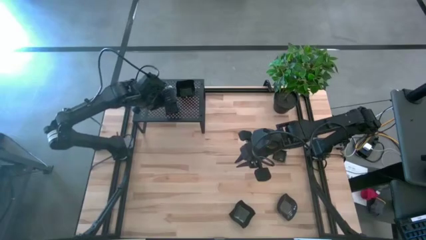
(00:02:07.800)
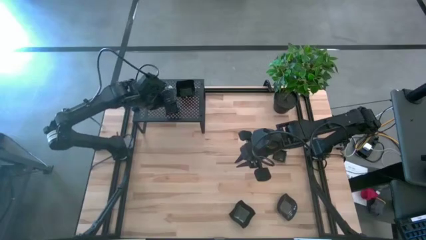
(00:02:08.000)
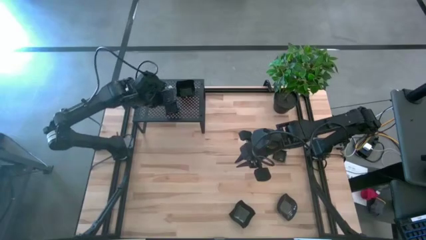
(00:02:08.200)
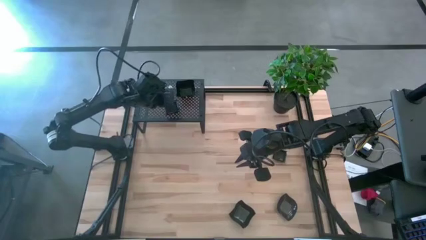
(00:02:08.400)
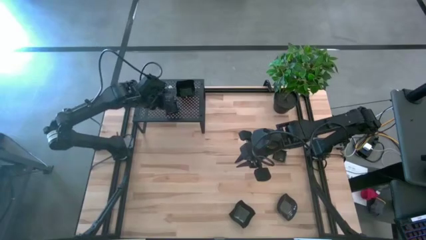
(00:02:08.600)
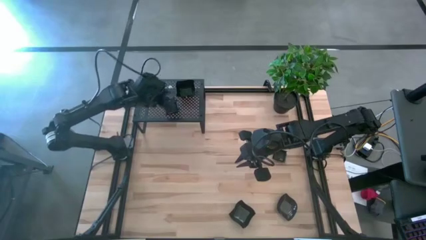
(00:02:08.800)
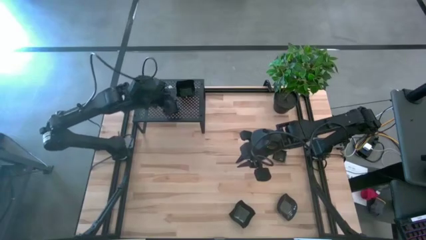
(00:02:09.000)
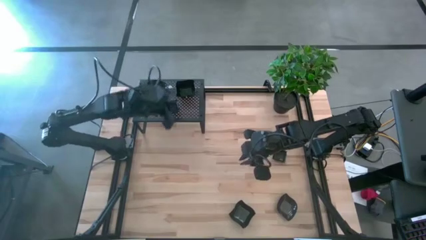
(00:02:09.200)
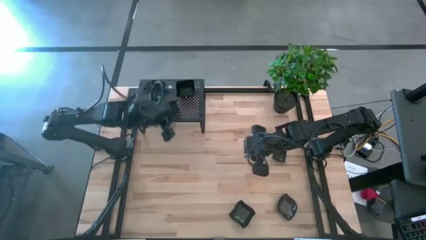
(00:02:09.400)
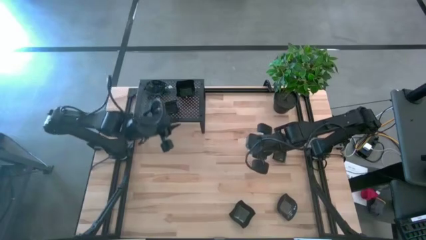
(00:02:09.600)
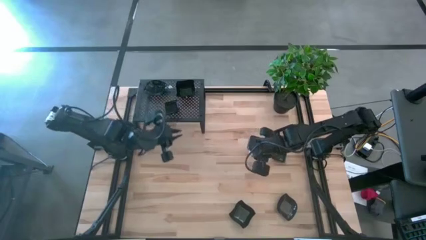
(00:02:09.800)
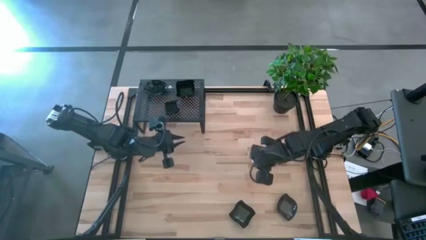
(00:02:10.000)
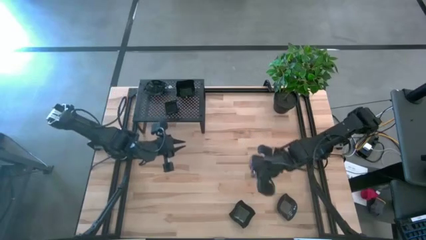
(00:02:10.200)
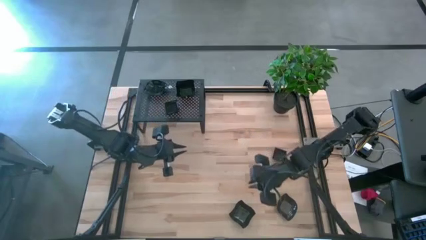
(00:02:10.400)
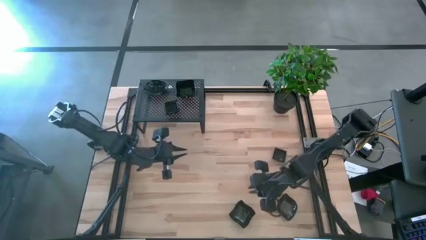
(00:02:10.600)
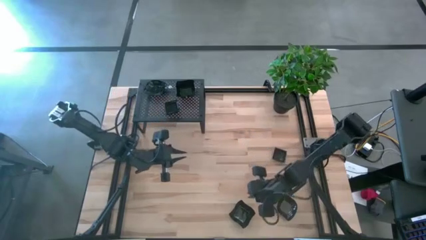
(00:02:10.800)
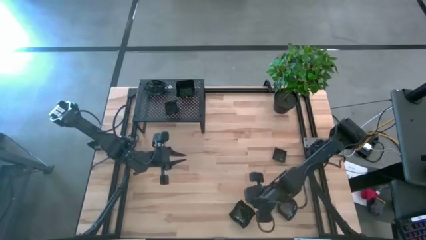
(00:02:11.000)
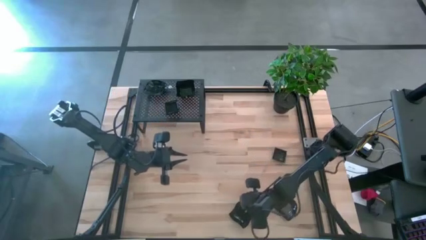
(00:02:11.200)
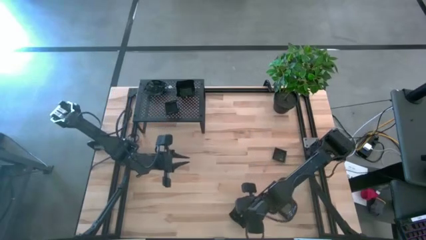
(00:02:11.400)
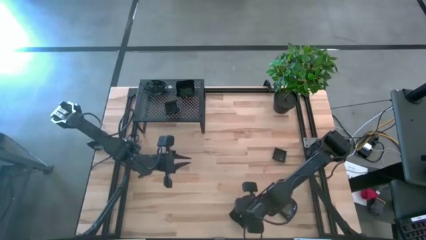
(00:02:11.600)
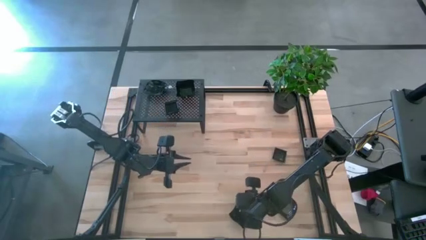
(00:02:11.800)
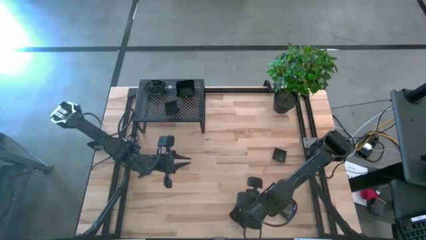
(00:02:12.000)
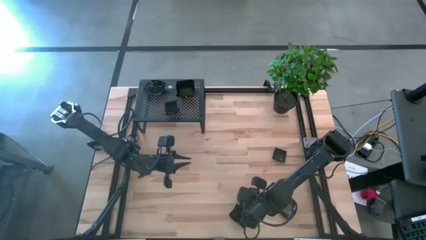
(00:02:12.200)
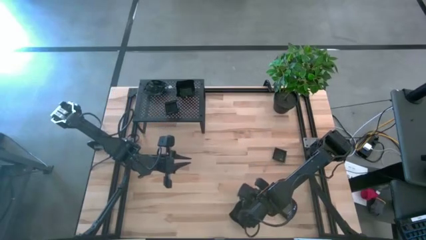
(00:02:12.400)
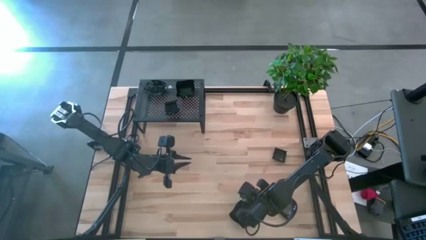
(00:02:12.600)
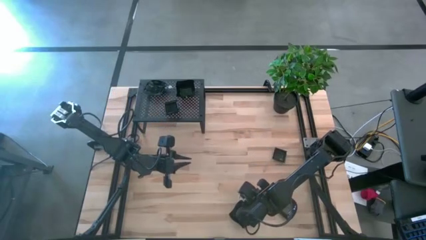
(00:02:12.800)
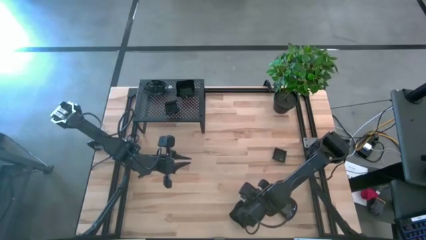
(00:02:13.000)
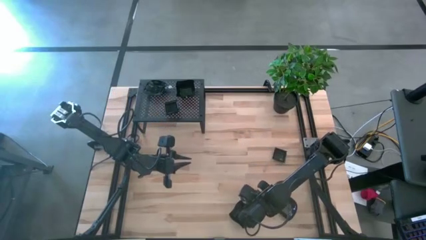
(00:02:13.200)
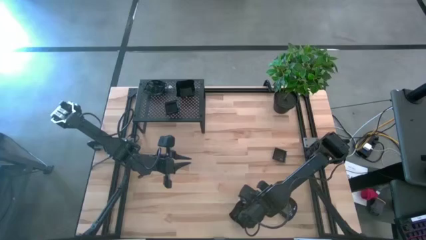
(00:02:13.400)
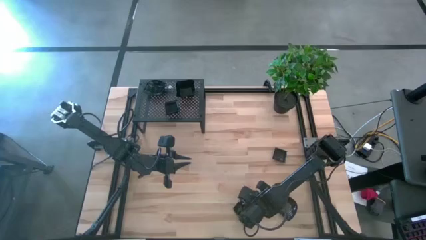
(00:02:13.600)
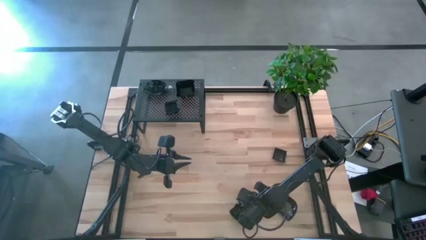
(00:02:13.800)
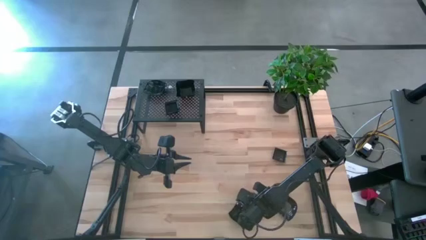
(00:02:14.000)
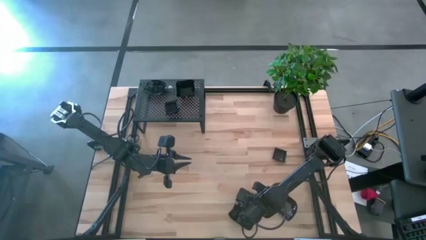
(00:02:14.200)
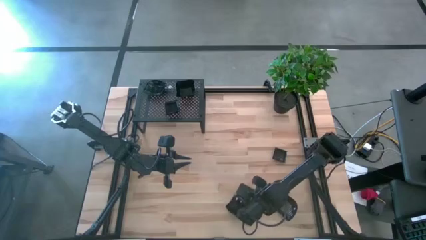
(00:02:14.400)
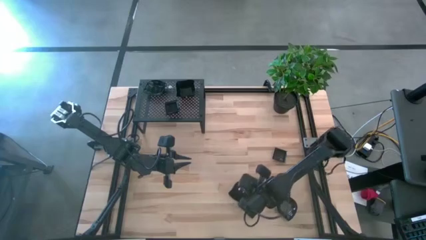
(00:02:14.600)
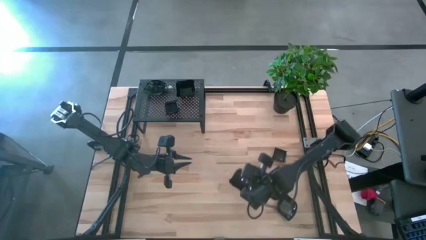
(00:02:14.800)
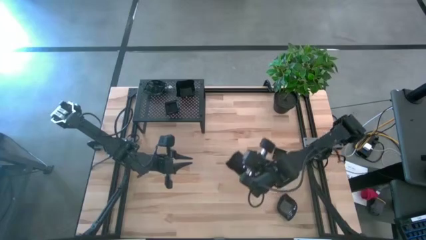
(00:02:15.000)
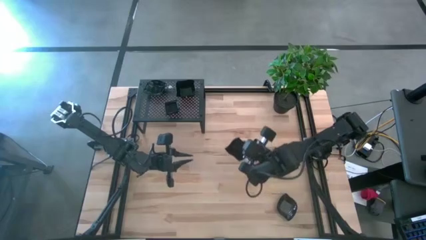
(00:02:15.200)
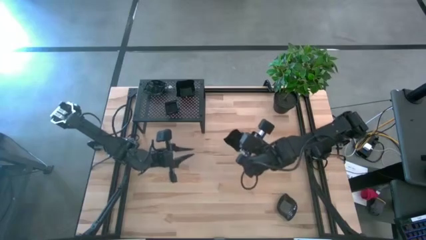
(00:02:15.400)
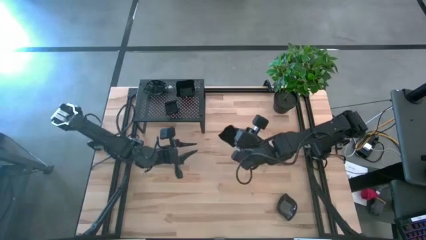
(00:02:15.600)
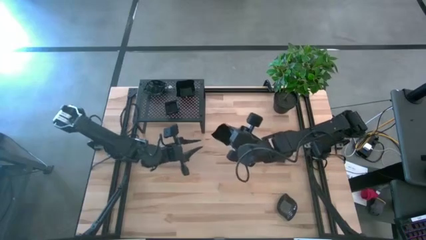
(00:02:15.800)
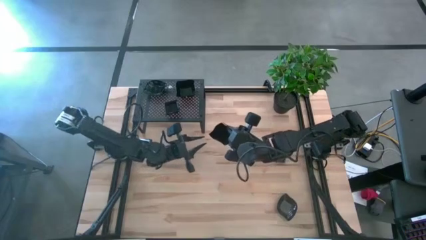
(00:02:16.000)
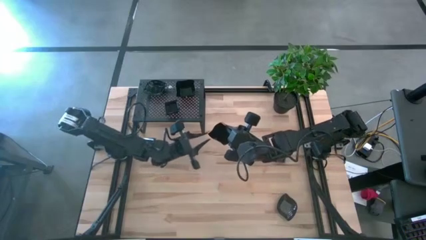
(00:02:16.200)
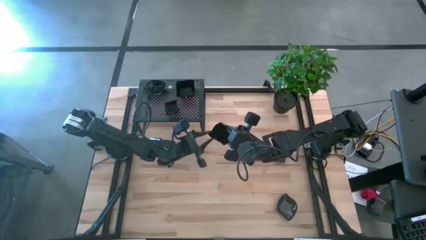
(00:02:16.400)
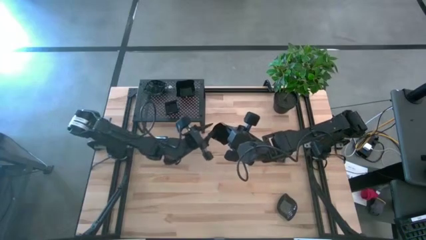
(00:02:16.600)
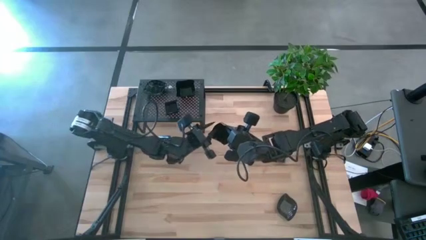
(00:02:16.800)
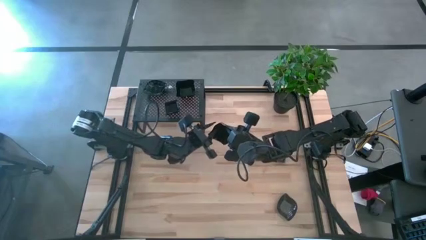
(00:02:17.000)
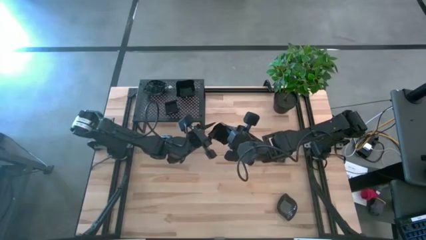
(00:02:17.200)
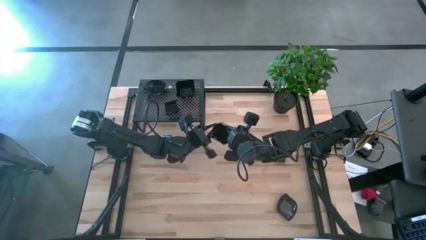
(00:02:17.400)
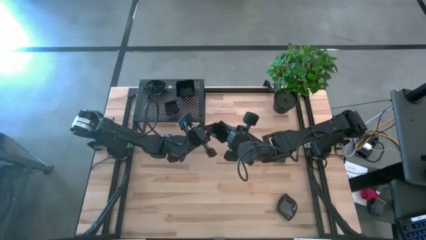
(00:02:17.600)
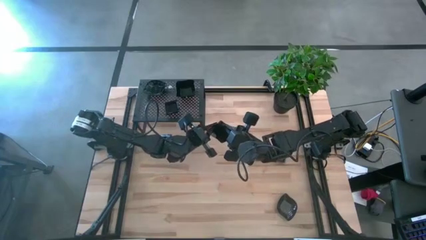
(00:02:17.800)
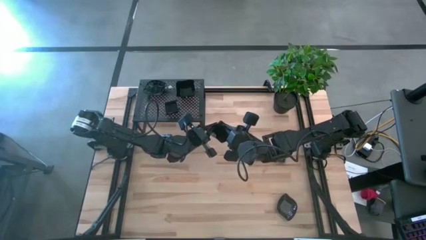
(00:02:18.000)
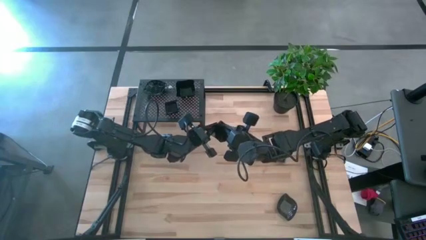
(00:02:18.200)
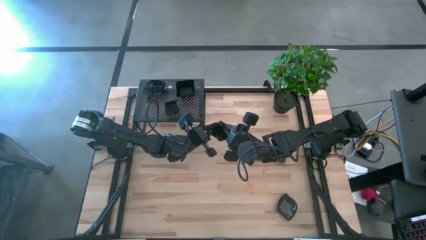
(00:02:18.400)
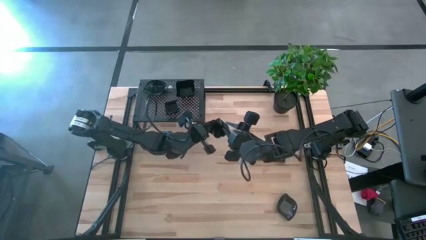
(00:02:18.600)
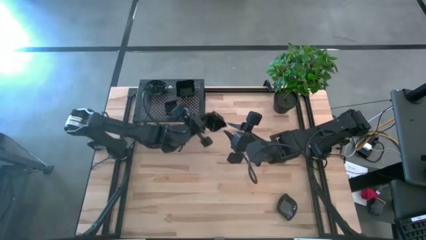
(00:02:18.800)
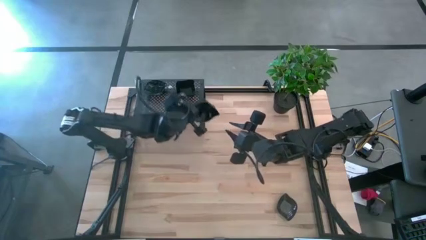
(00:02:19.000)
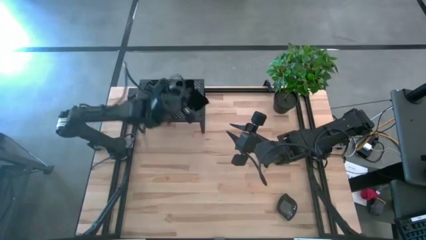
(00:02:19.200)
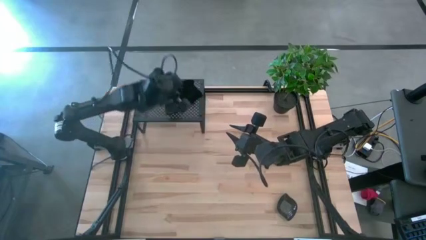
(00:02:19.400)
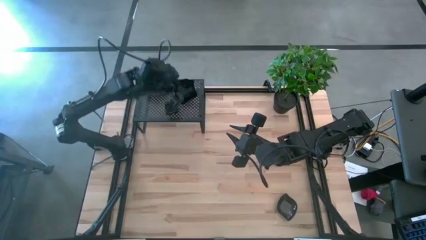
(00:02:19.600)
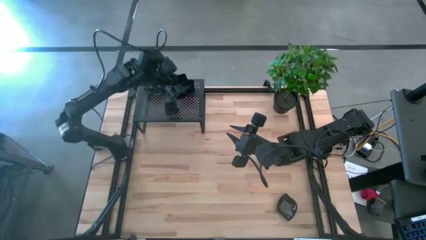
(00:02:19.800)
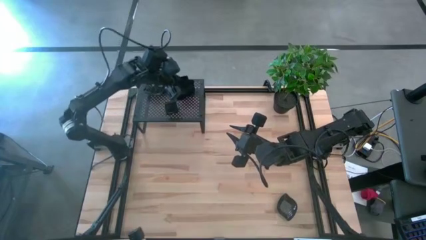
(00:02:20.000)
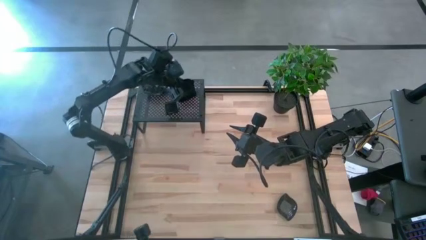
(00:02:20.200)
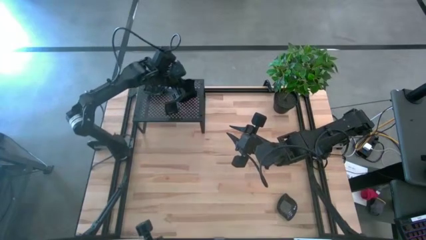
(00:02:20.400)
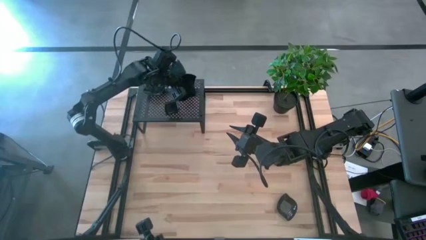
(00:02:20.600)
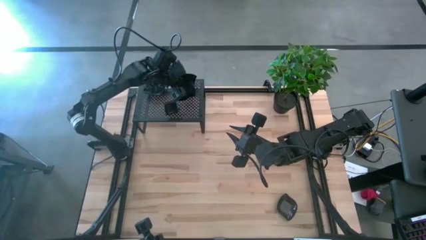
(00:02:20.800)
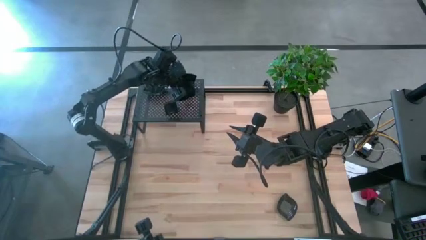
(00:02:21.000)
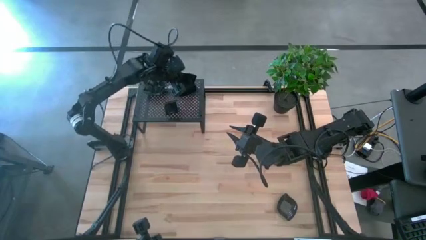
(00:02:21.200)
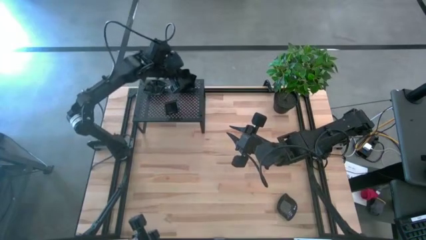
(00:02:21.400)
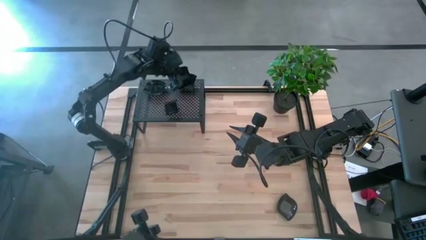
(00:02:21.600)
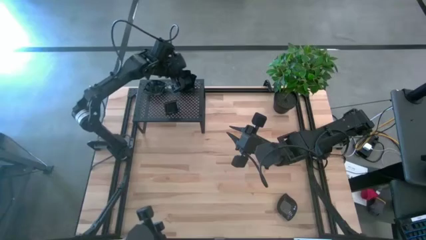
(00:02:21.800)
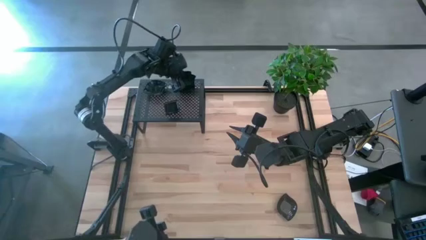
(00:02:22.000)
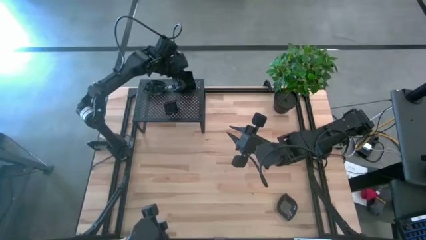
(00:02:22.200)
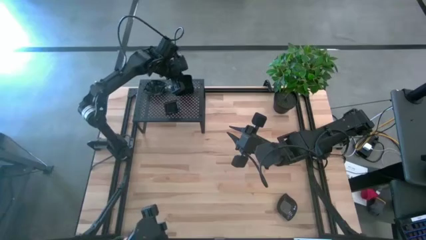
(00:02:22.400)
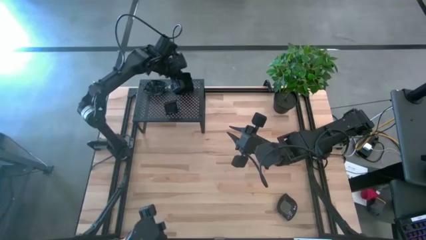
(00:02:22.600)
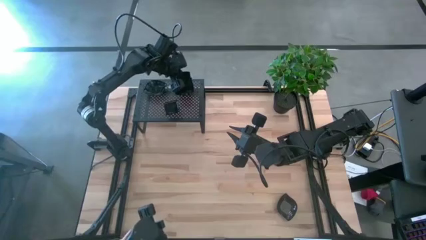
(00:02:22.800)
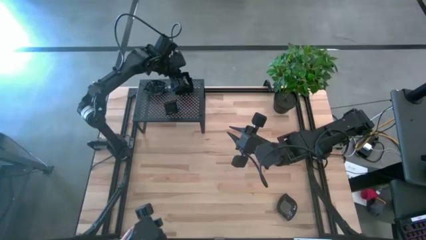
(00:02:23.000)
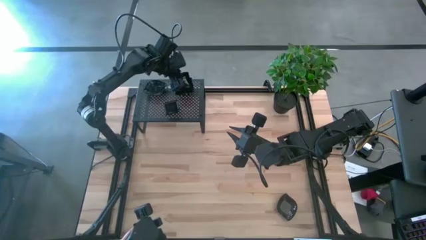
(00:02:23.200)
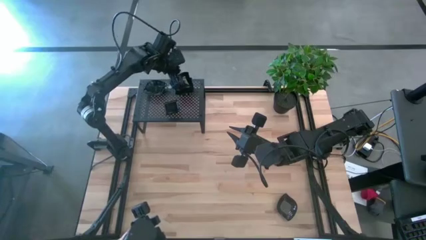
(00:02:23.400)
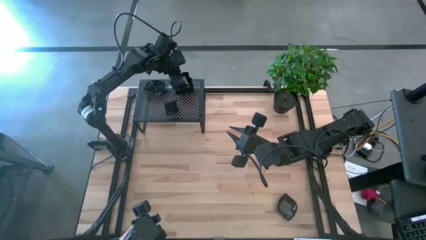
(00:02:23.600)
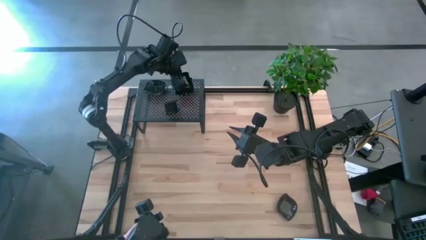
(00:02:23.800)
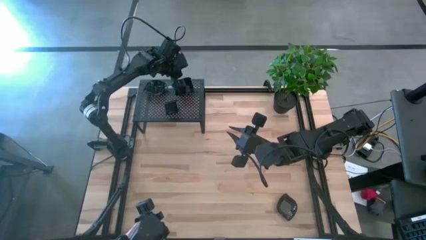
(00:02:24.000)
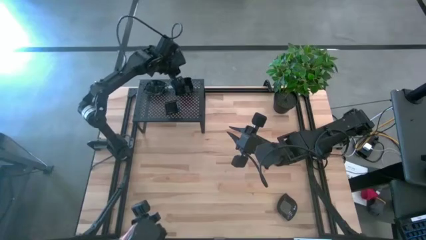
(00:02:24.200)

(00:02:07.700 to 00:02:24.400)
Task: Pick & Place Mini shaped plates
Stack the distorted square plate on top of the stacked distorted square plate on the shelf
